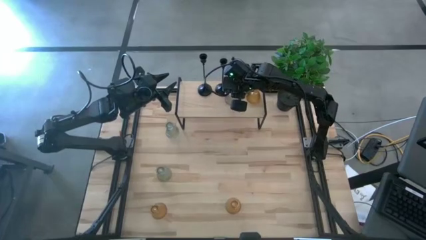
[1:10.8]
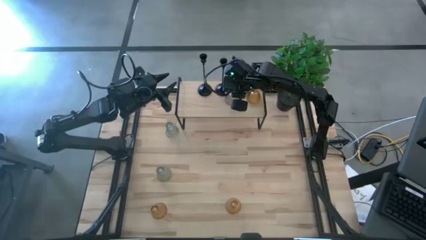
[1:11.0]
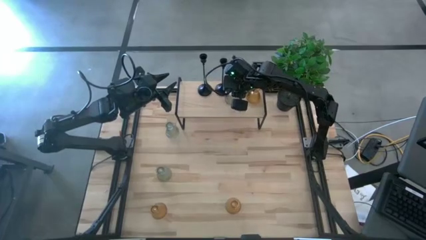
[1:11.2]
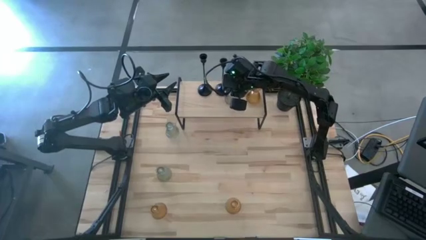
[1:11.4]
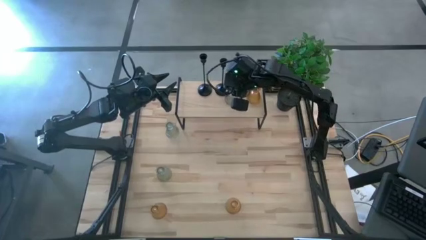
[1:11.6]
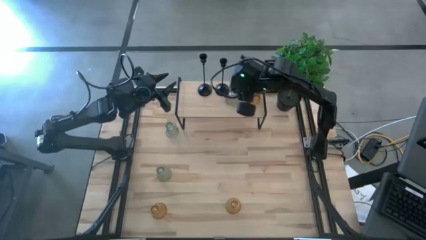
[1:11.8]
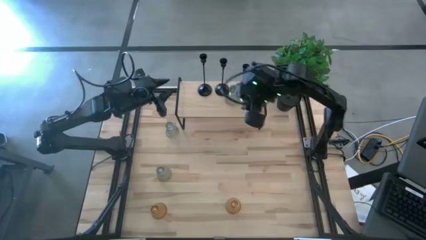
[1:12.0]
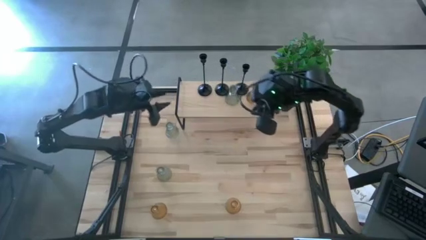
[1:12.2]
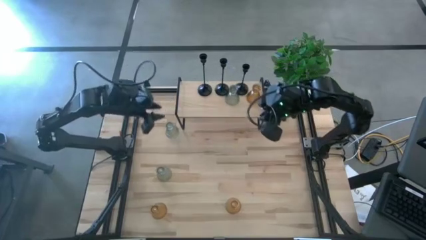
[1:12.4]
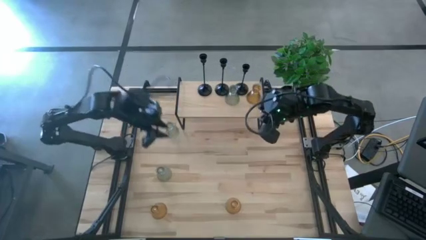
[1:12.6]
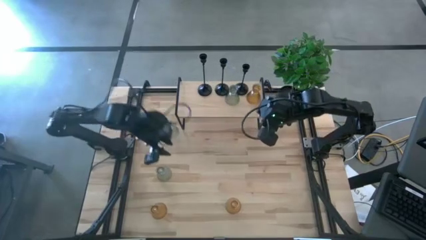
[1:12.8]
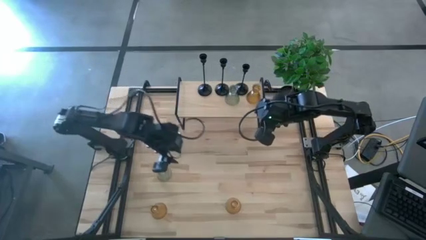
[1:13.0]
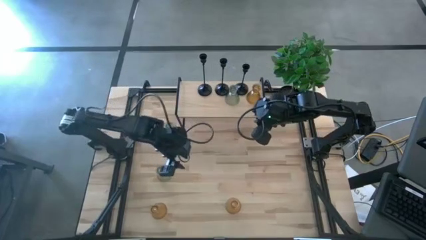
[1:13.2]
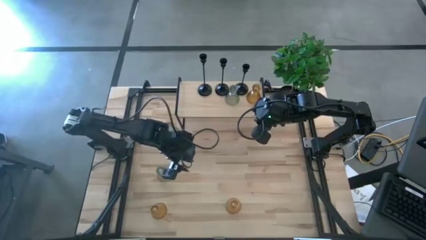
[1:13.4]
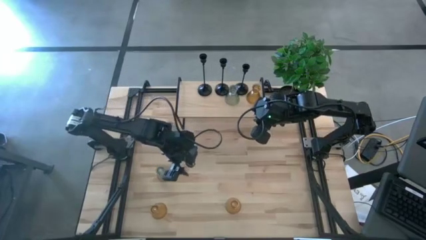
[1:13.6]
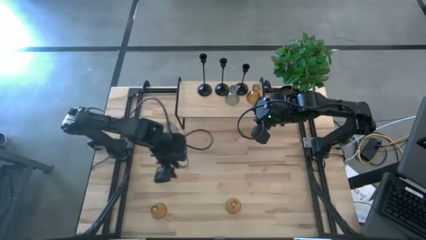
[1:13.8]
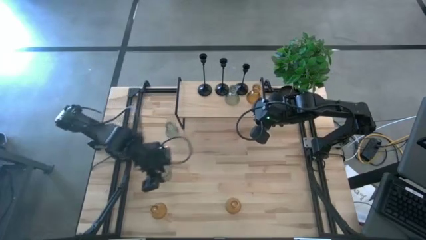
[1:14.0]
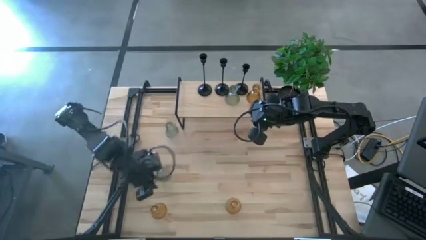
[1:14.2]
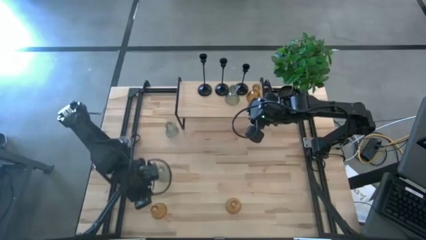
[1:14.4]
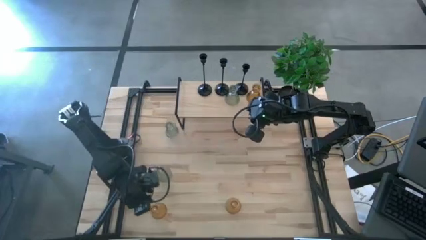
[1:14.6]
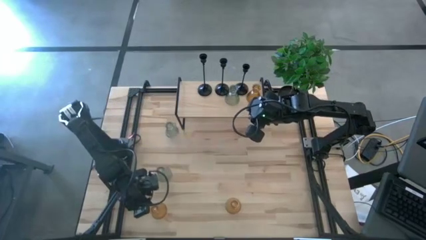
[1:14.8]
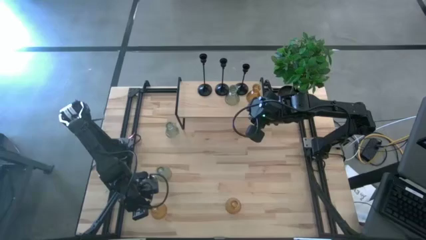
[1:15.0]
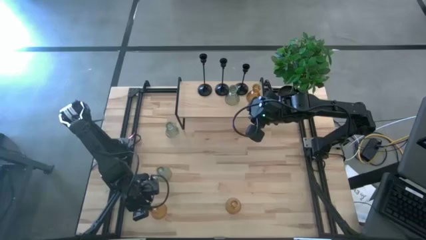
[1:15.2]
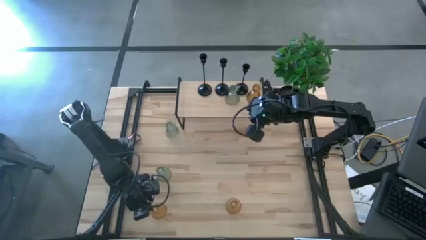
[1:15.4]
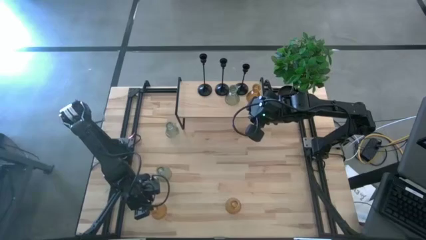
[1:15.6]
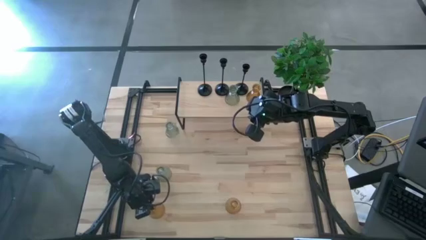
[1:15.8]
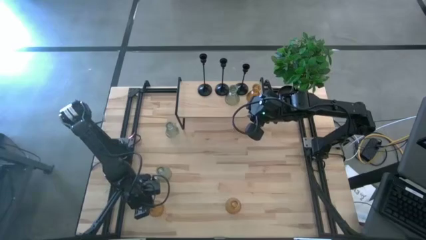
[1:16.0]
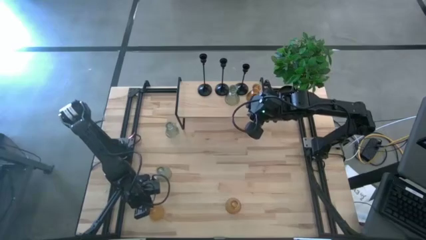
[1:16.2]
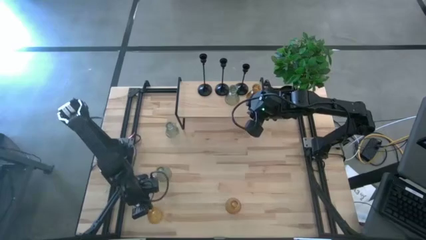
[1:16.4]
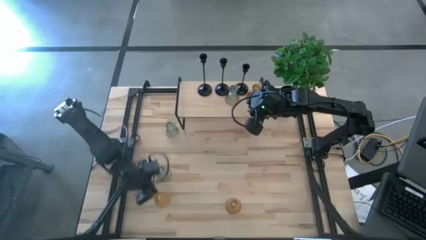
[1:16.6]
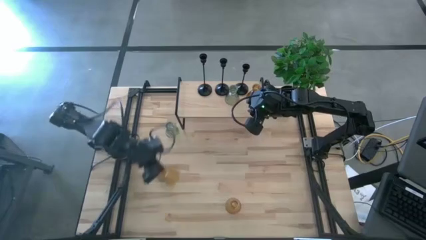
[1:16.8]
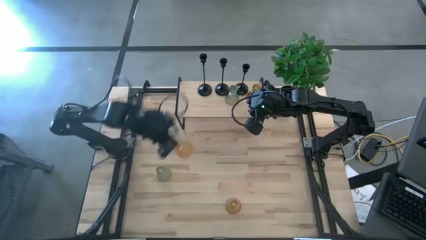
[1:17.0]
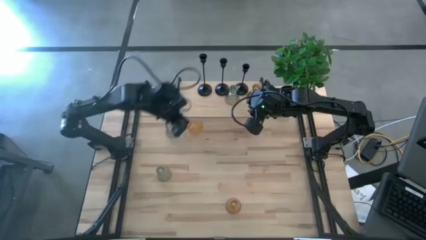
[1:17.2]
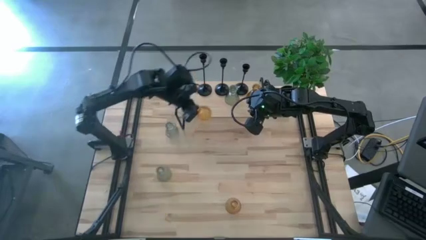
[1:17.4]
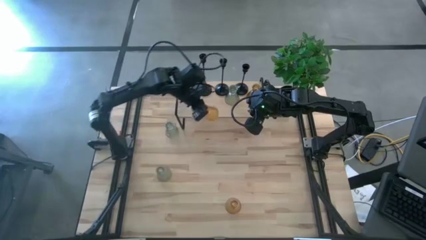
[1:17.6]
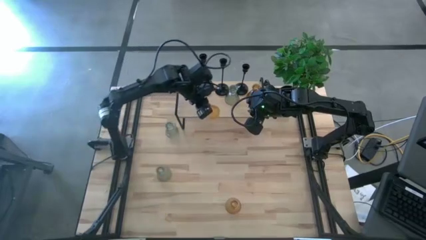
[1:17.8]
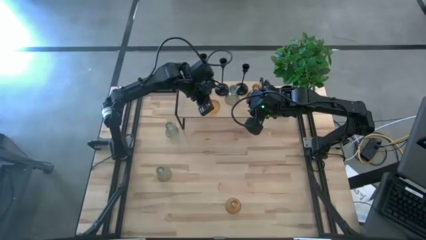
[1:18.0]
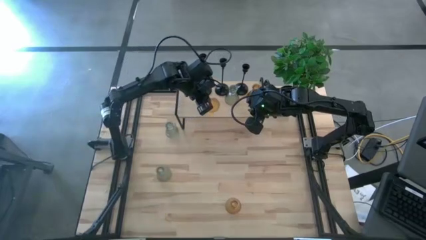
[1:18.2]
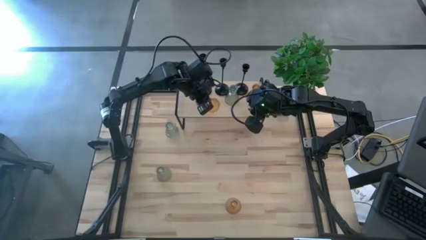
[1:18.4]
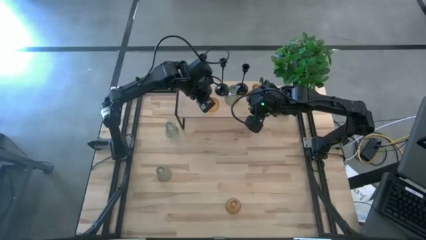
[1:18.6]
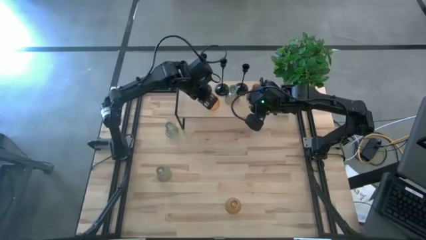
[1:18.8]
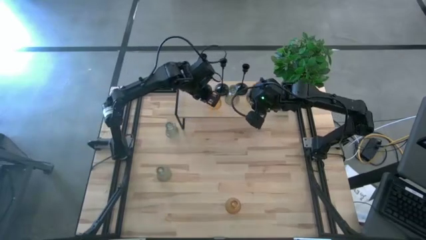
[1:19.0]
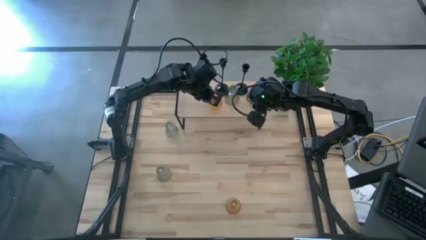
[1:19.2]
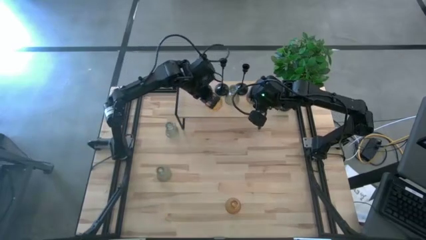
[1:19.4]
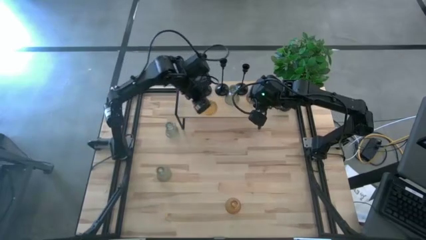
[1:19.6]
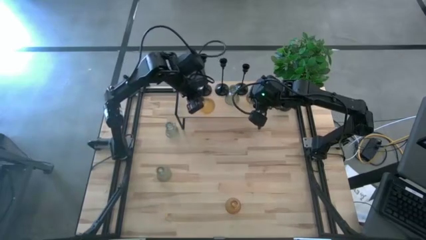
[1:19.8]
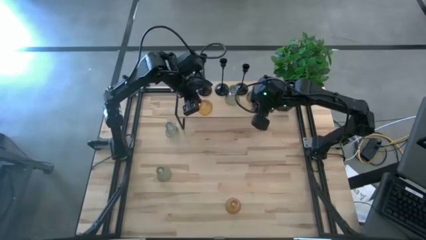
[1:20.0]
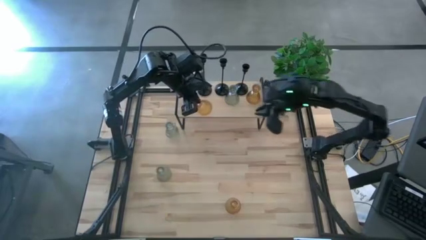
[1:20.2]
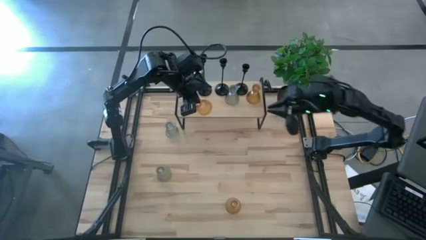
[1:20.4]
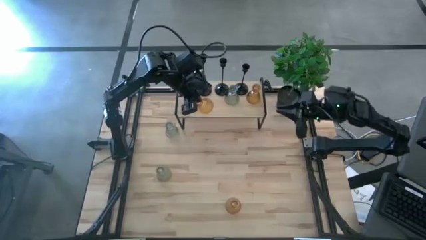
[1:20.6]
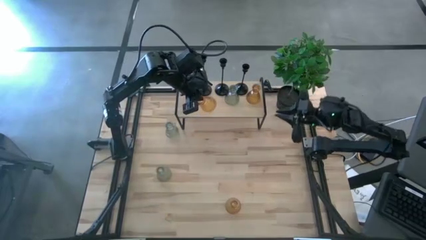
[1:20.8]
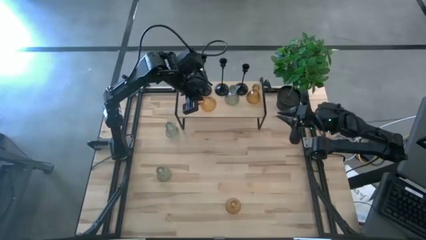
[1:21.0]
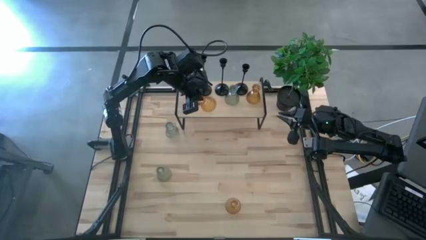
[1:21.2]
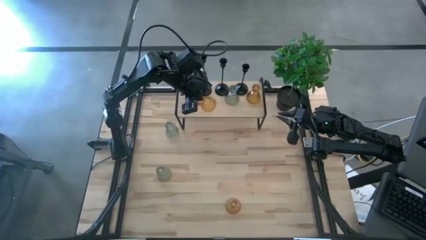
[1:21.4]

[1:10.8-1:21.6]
Task: Pick & Place candle stick holders
Put the left yellow candle holder on the shelf

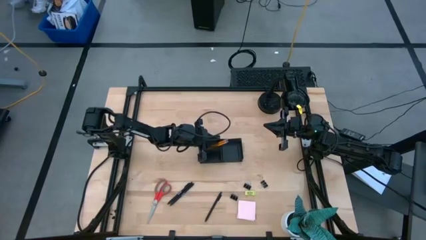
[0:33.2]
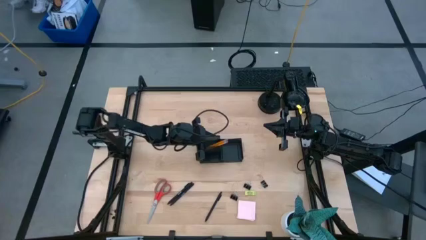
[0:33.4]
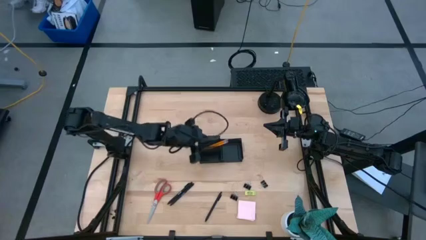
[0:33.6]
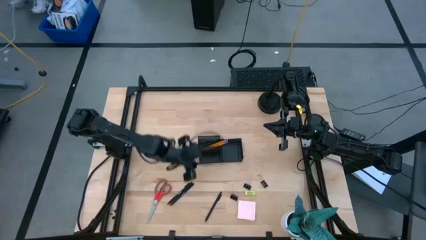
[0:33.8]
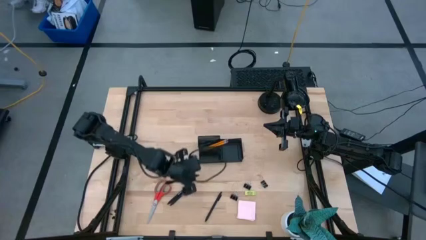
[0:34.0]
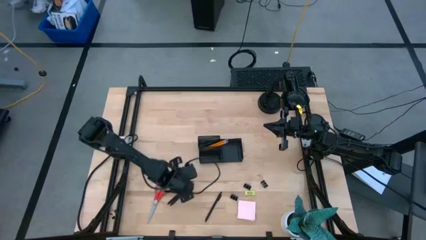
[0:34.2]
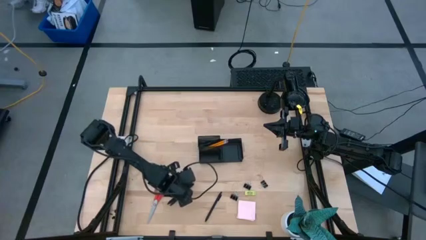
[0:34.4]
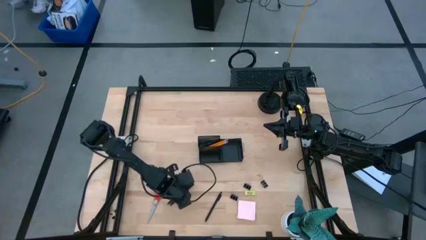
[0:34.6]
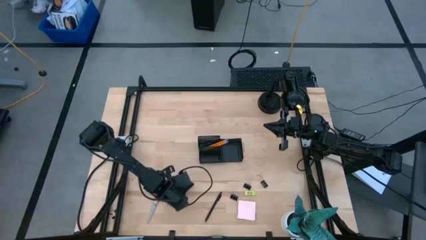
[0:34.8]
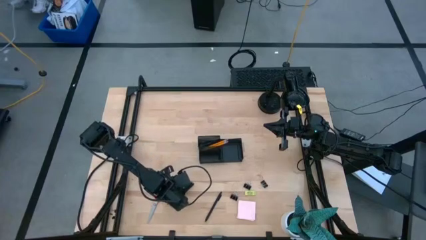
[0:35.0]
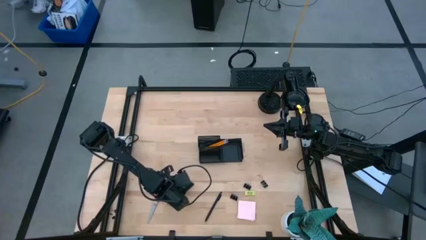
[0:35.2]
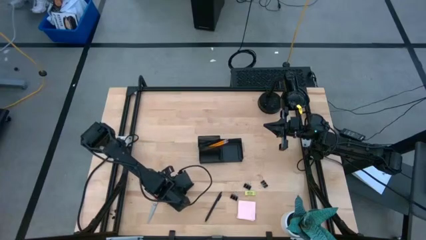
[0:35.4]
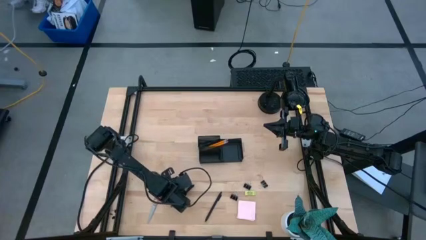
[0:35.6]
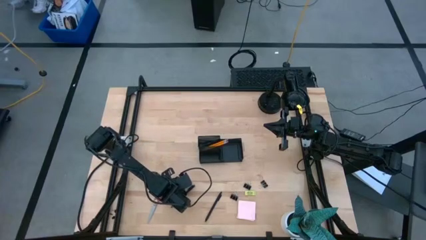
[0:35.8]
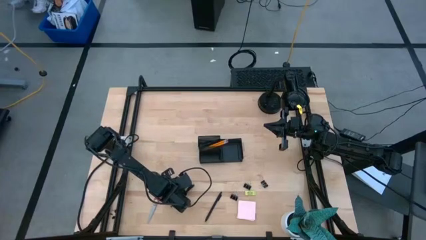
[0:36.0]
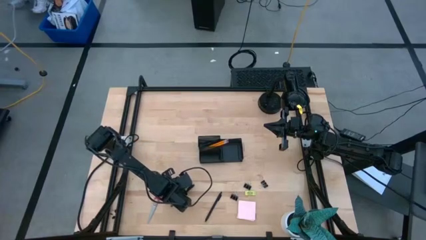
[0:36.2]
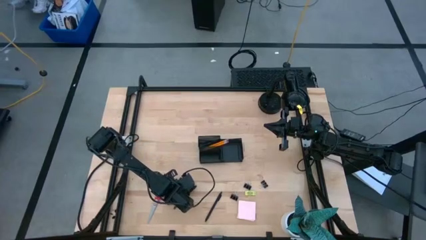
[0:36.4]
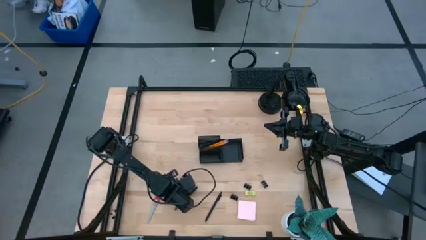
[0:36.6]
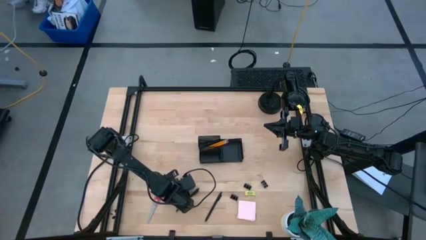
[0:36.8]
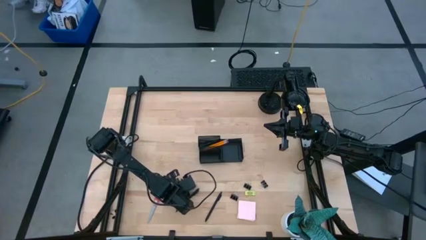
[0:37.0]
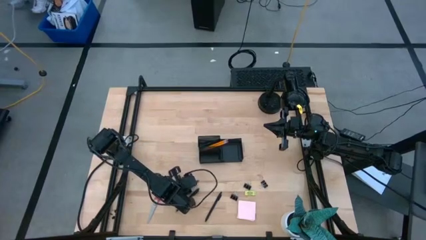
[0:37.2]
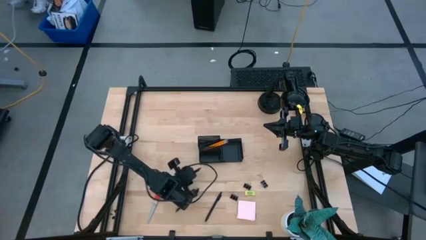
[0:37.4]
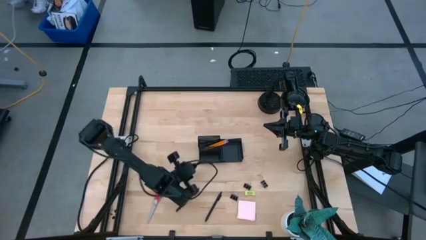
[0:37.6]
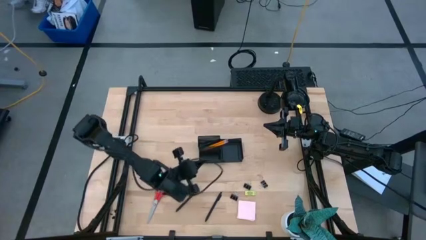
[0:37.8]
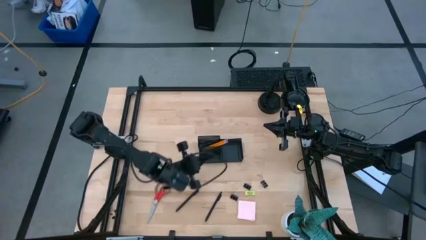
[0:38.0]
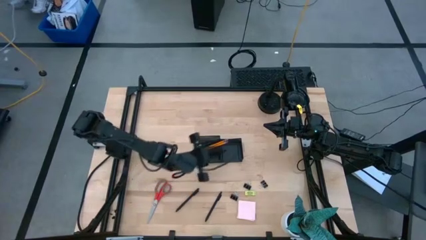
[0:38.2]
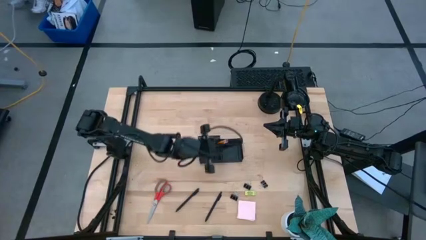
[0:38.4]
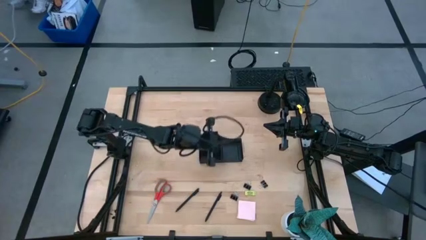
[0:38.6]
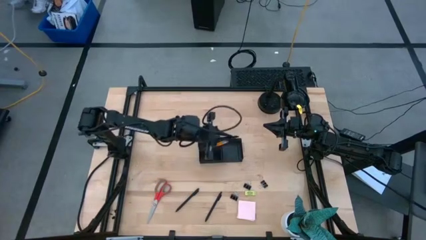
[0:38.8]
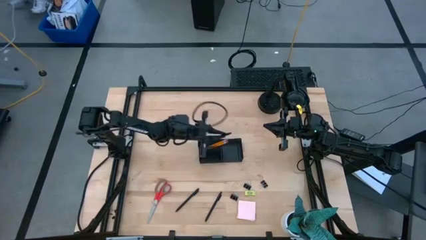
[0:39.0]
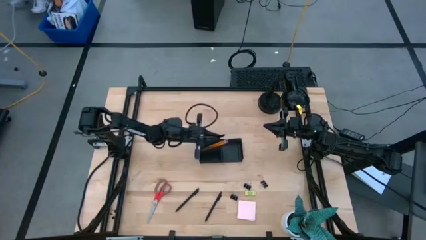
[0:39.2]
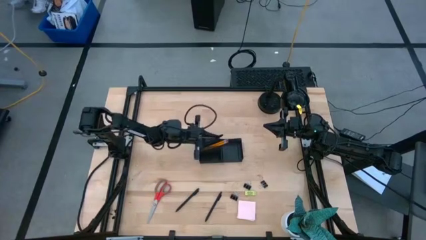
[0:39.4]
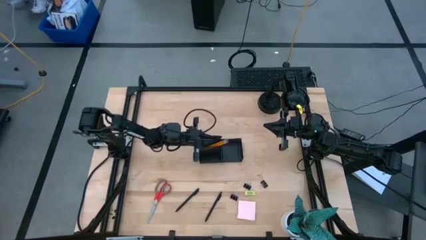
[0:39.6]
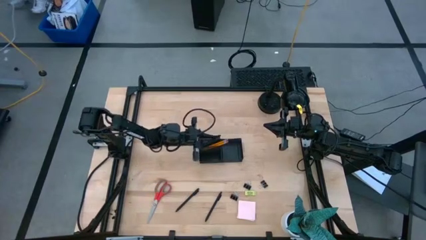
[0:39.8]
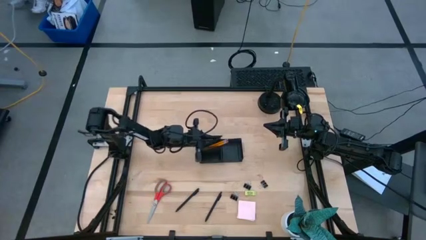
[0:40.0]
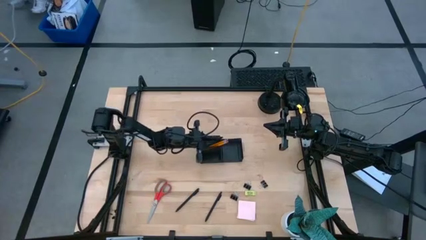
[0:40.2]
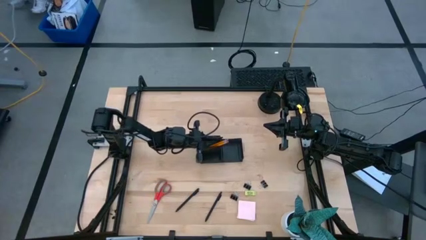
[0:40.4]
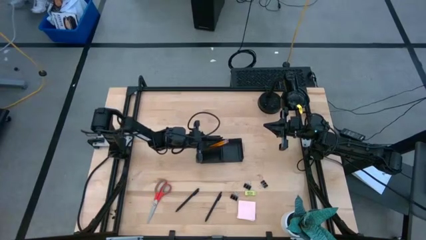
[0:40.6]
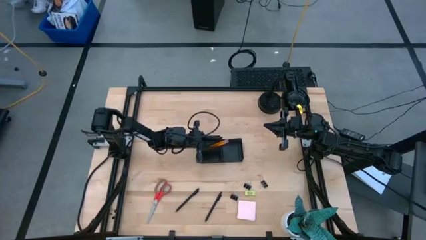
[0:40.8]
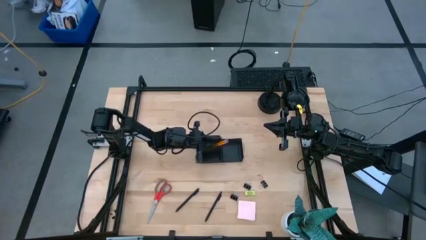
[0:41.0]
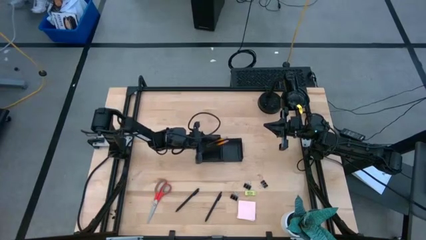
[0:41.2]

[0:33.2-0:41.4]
Task: Pick and place office supplies into organizer
Put the left pen into the top left section of the desk organizer
